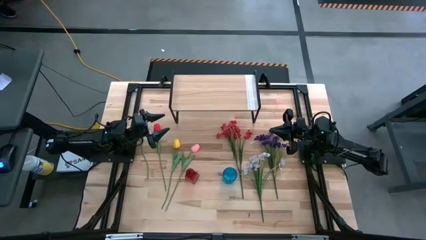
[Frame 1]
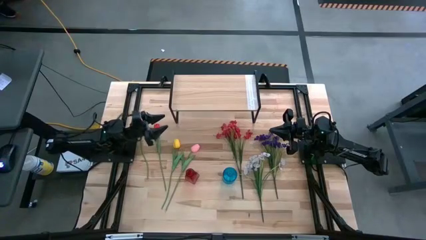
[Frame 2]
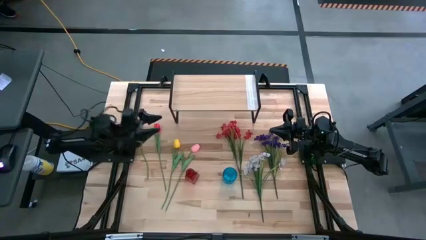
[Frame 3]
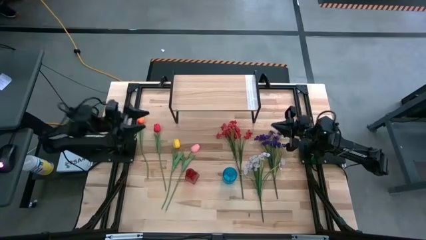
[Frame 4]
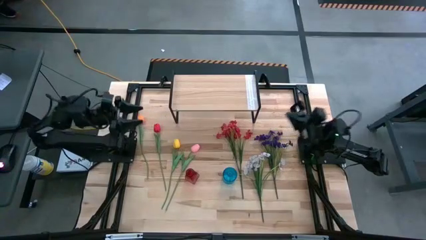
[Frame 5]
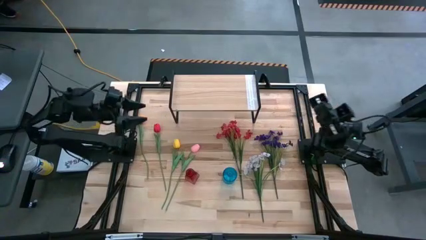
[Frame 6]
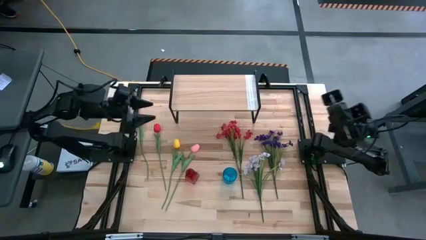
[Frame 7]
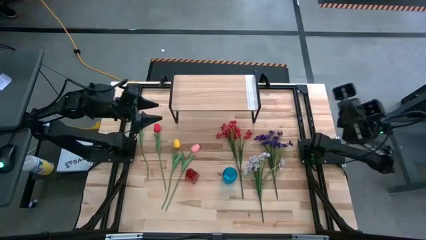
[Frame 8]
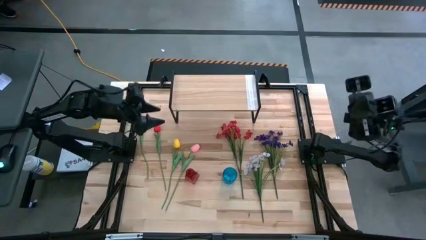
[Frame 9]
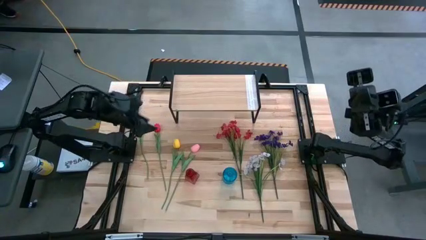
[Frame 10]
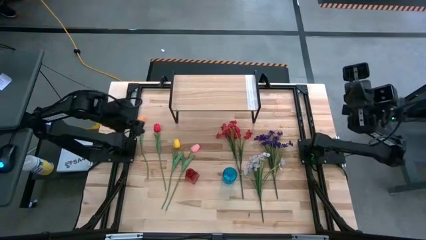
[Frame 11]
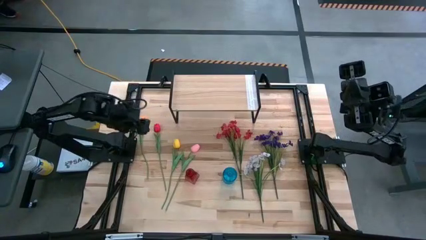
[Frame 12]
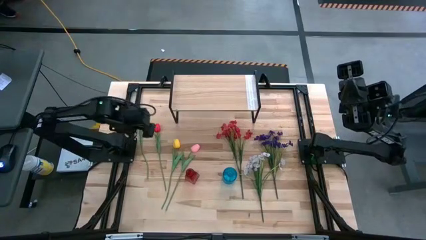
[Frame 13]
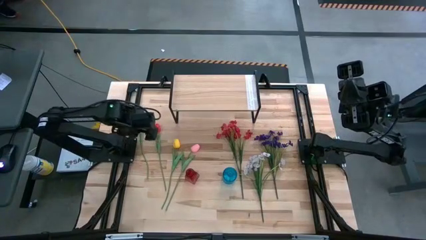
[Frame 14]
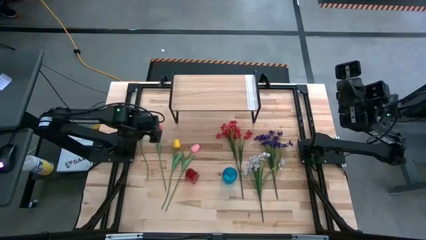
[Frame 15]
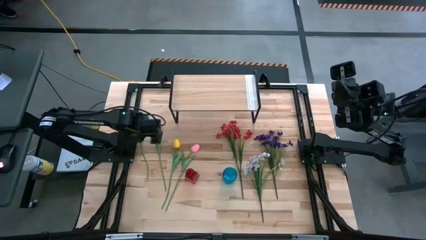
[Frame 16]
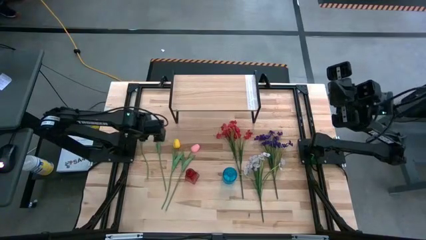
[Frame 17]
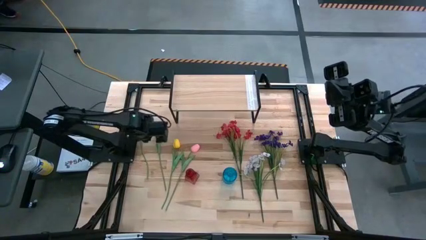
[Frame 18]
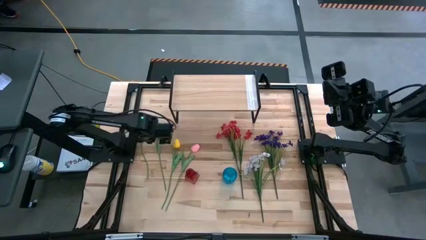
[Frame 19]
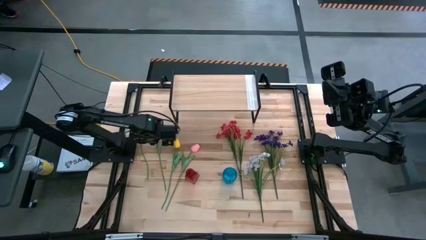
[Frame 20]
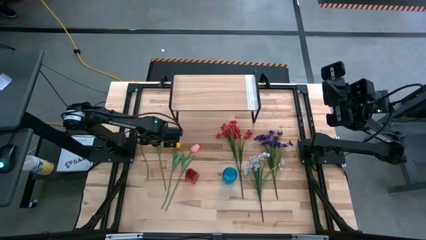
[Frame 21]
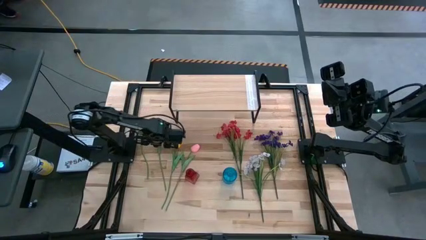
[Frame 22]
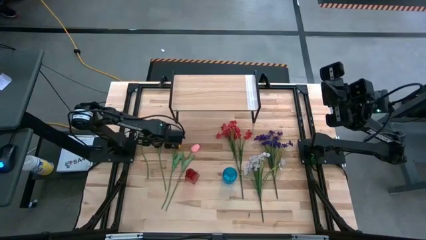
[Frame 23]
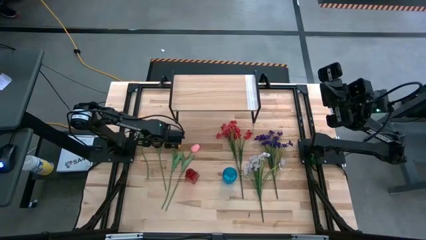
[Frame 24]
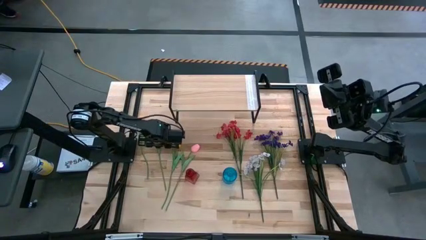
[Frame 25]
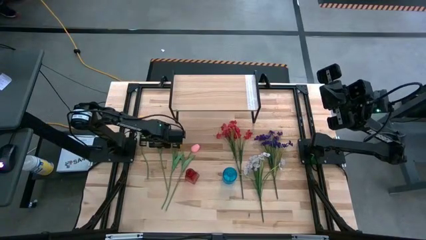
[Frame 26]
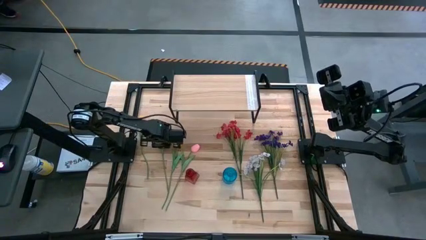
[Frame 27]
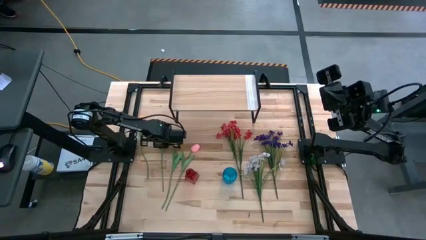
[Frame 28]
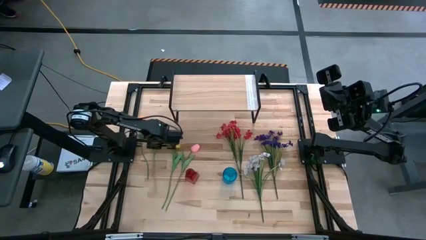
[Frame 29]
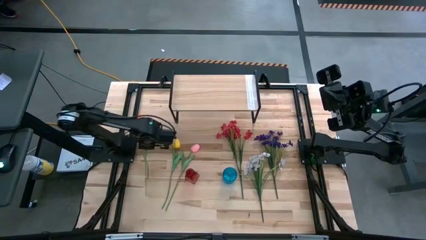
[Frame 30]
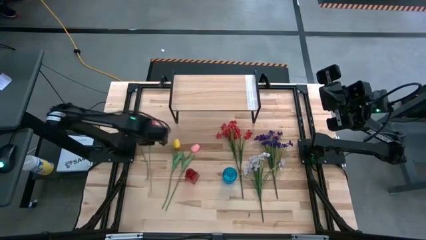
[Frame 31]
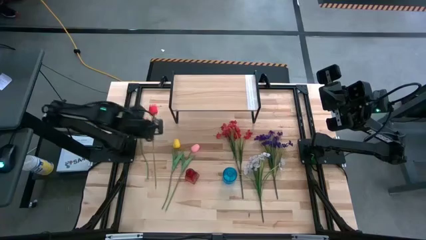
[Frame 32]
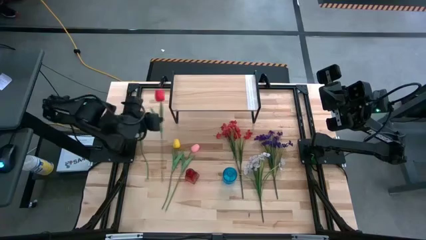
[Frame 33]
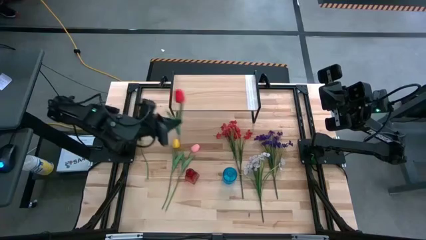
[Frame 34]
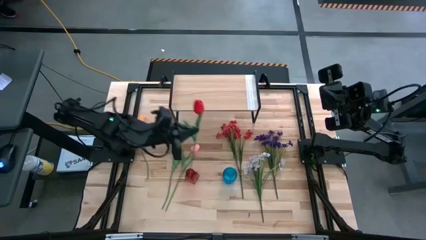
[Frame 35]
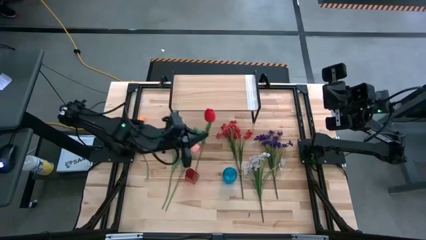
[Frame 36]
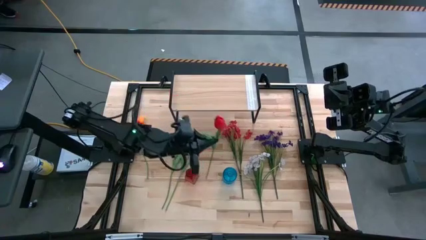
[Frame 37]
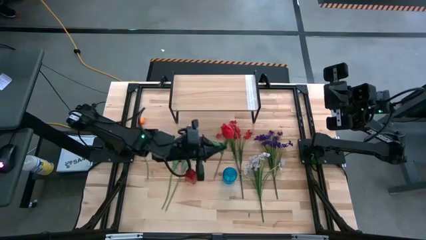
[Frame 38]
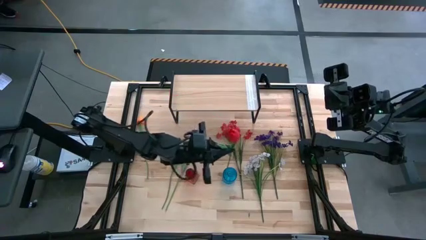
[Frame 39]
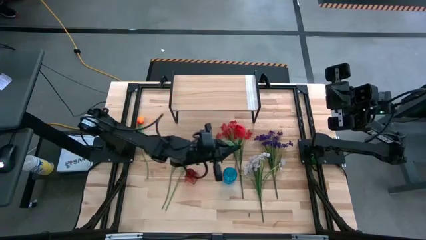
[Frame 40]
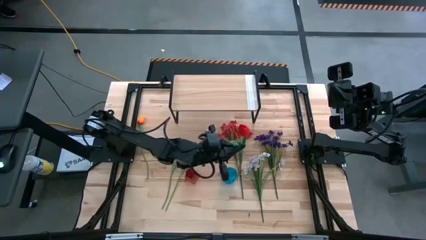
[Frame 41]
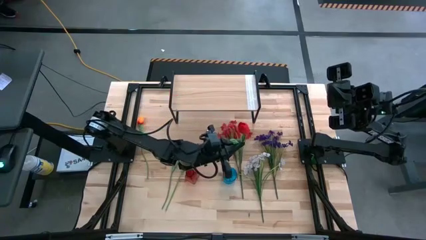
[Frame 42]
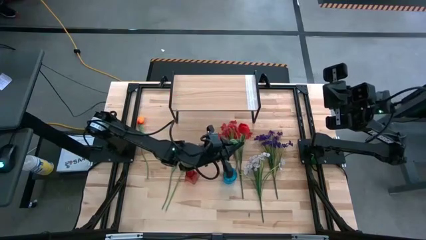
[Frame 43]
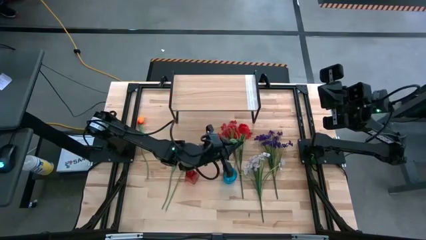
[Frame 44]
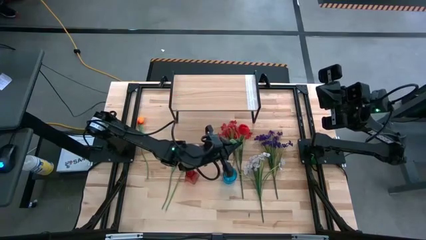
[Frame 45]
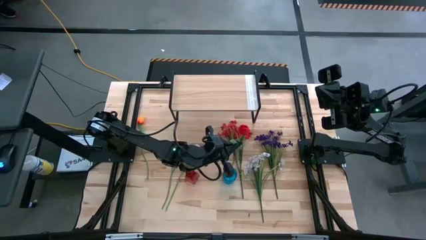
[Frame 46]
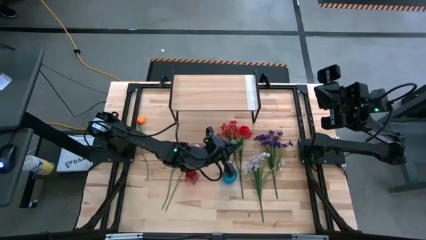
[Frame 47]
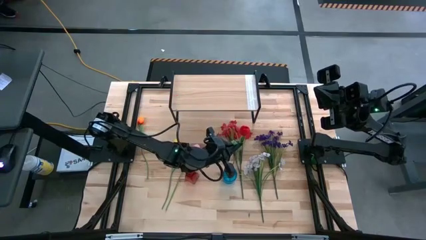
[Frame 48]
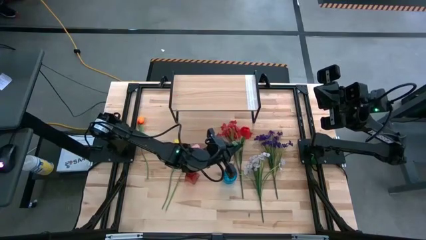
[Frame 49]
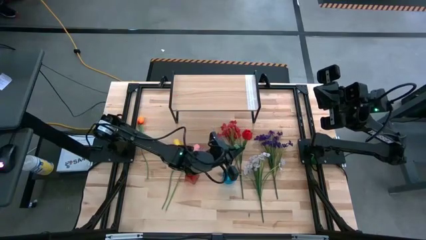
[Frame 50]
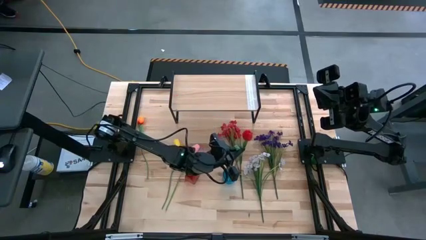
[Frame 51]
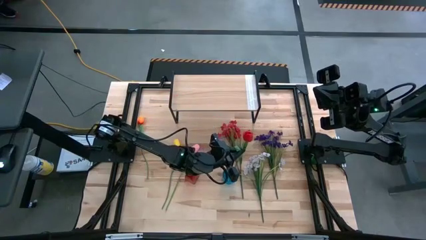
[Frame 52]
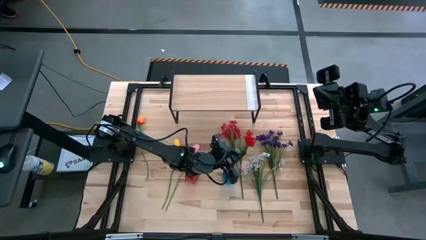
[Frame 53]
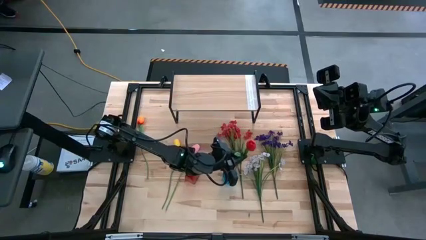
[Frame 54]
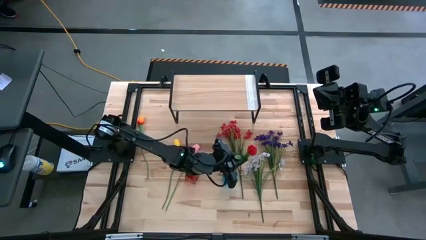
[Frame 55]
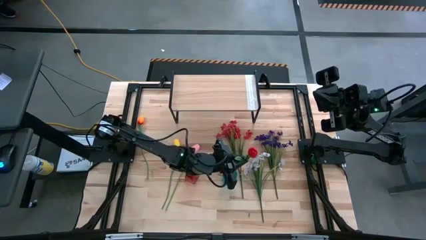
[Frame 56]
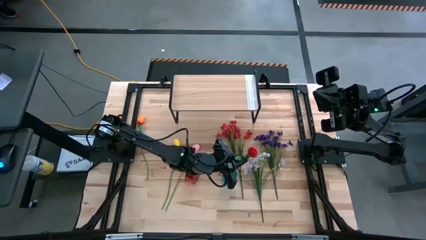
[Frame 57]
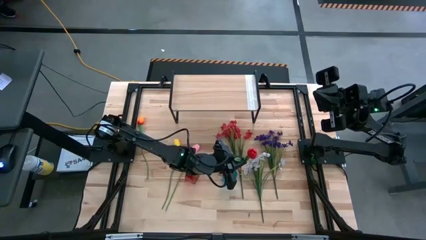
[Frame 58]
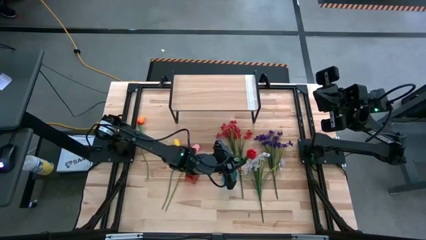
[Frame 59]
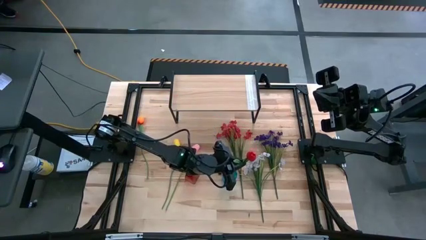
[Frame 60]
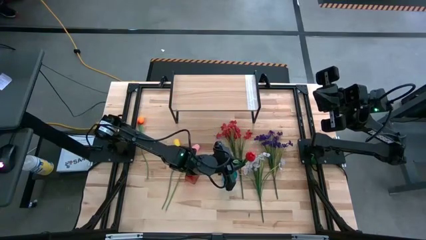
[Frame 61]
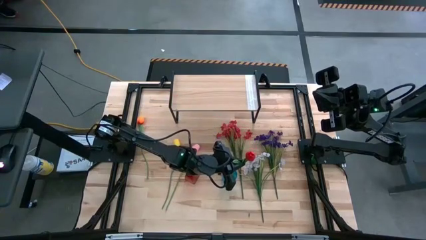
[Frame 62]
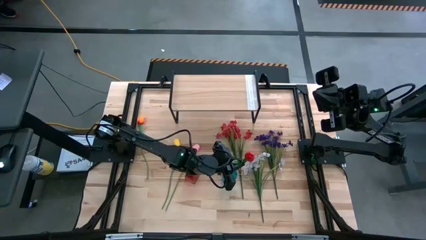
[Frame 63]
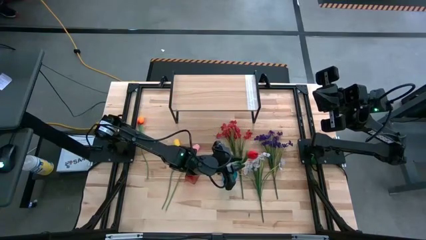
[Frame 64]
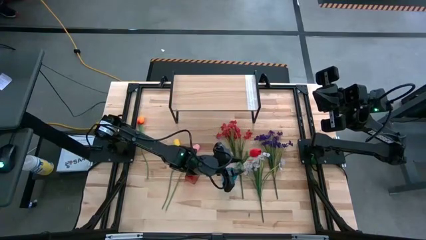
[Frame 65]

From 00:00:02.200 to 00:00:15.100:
Task: Pick and place flowers into a vace then onto a shelf
Put the left red flower into the blue vase

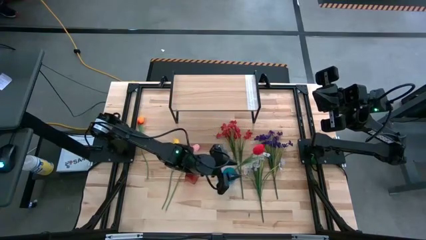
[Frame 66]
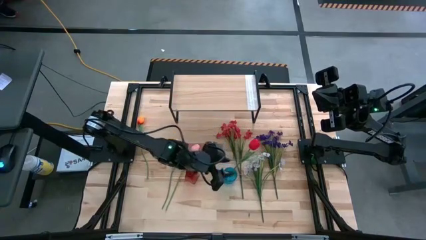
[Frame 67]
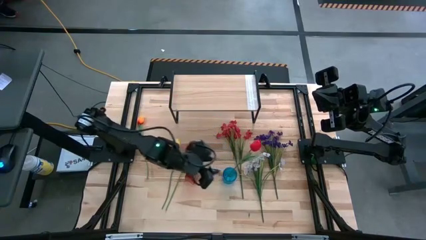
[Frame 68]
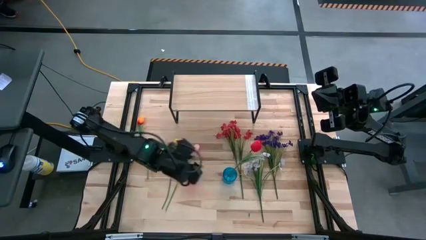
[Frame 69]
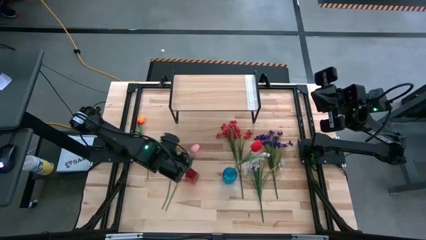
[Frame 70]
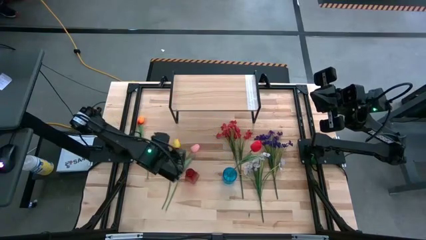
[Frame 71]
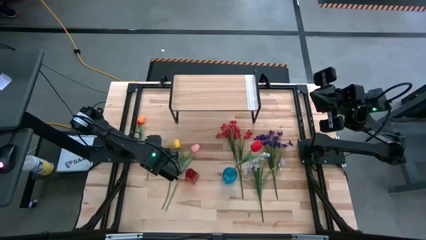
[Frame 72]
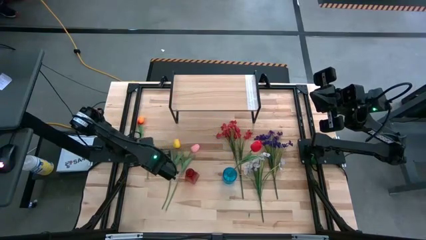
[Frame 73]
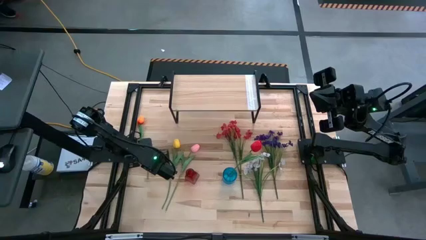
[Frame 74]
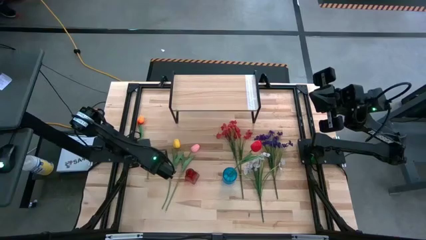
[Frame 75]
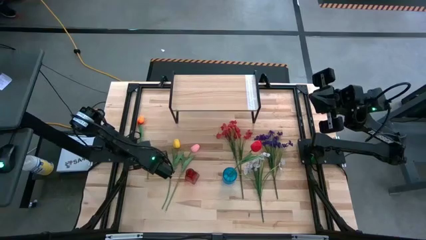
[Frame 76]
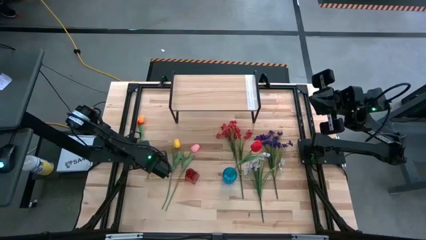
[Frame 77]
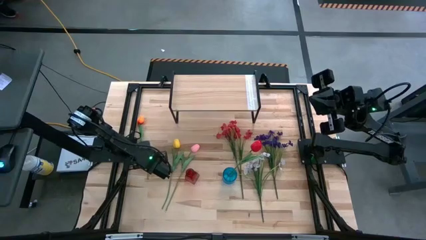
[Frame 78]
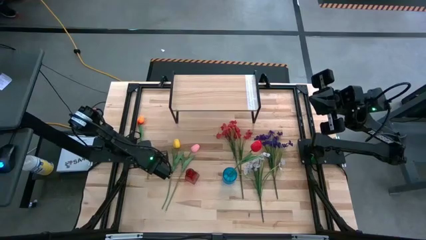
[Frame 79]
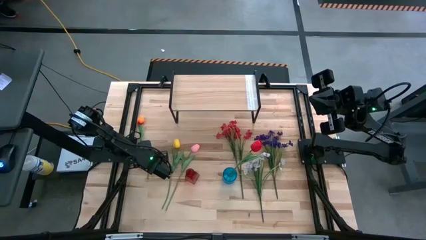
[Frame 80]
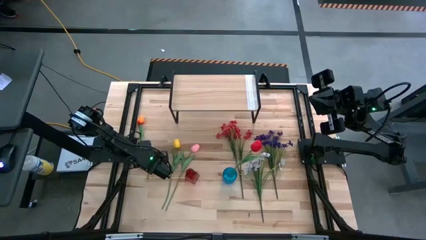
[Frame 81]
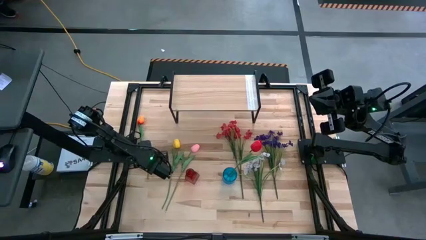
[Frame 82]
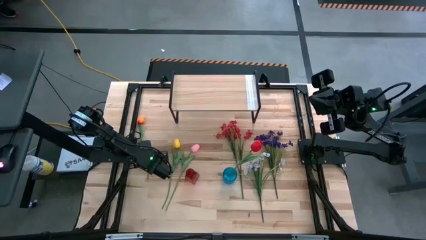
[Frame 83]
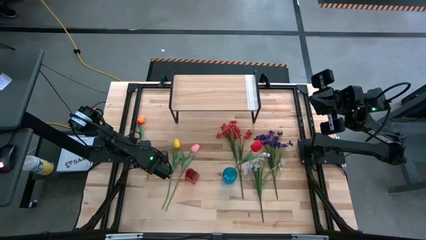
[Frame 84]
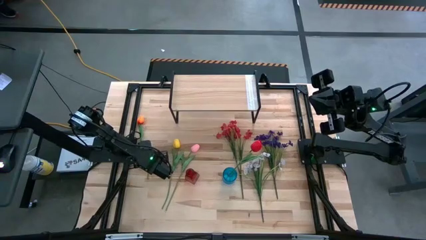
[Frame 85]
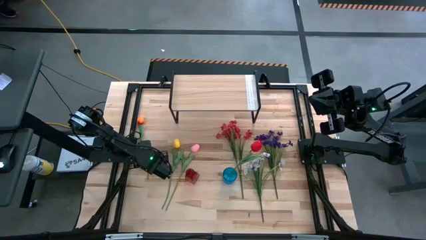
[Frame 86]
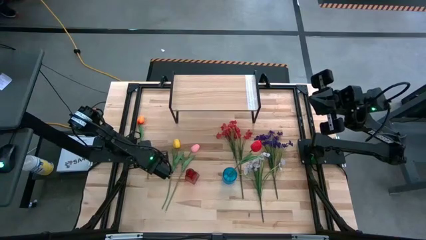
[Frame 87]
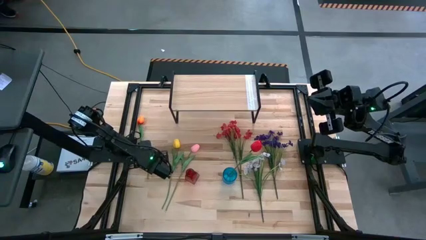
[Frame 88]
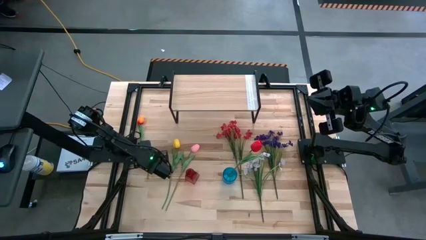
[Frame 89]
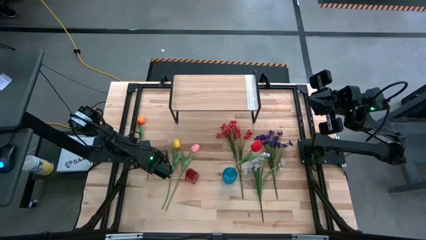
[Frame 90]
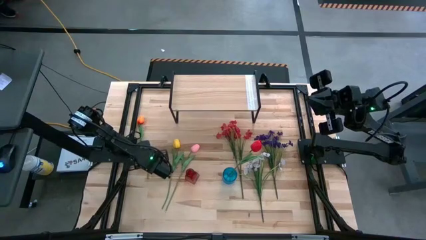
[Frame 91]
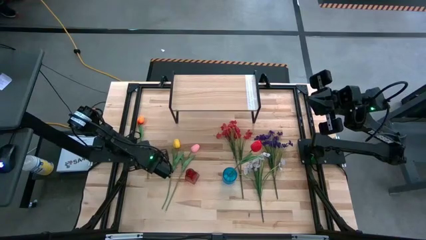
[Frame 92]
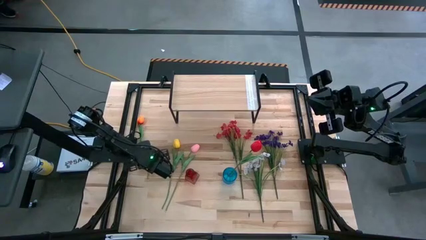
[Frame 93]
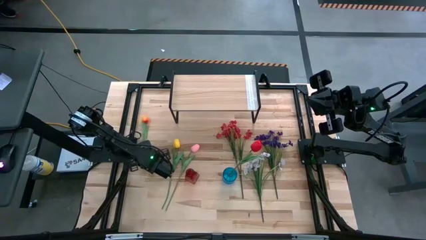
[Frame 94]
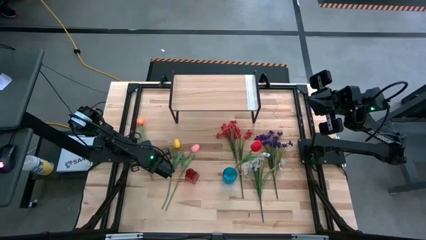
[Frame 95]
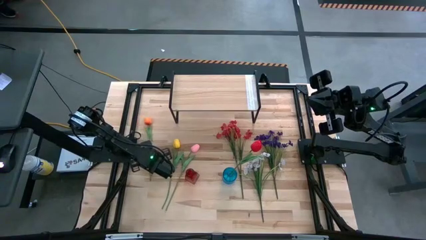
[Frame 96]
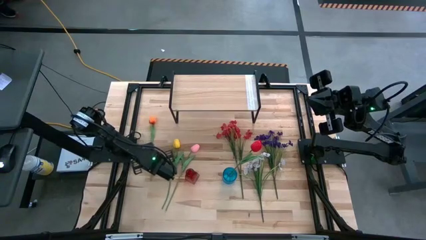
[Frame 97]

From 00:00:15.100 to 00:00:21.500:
Put the orange flower into the blue vase
